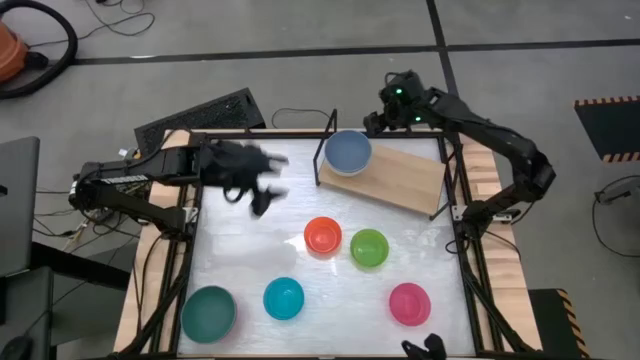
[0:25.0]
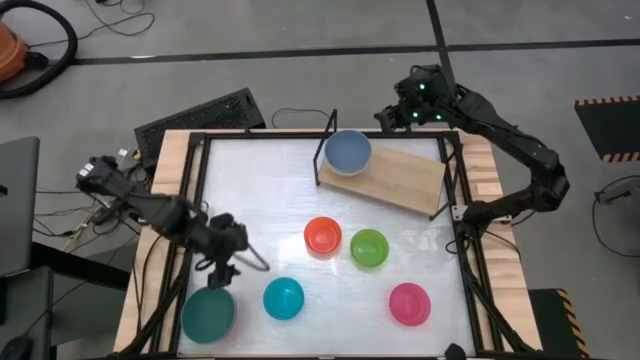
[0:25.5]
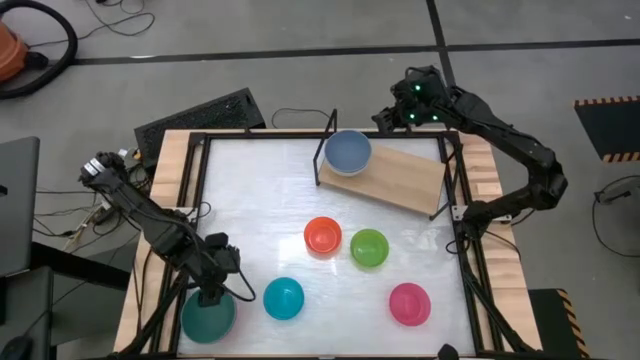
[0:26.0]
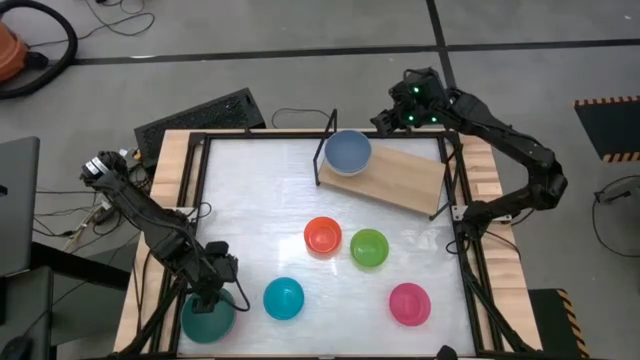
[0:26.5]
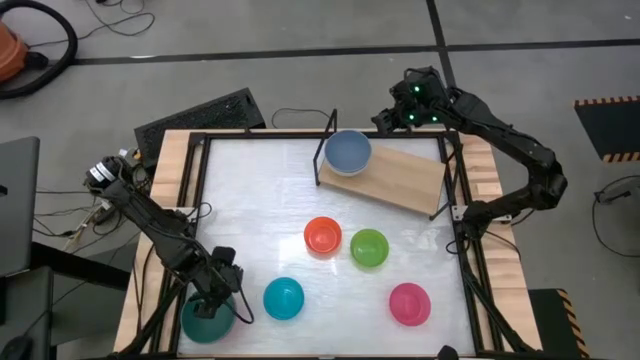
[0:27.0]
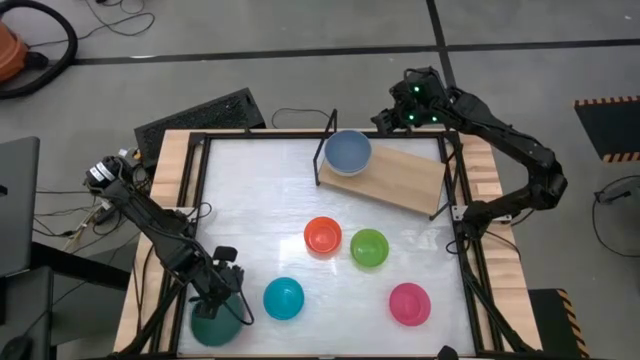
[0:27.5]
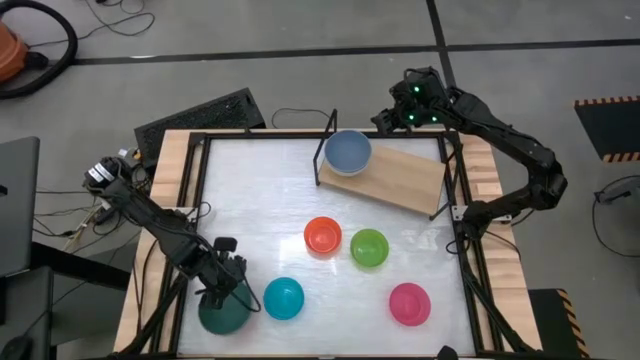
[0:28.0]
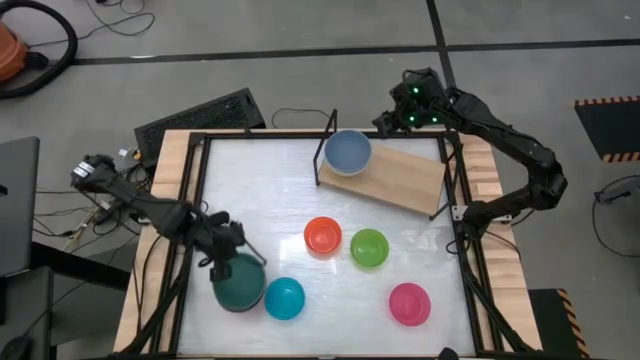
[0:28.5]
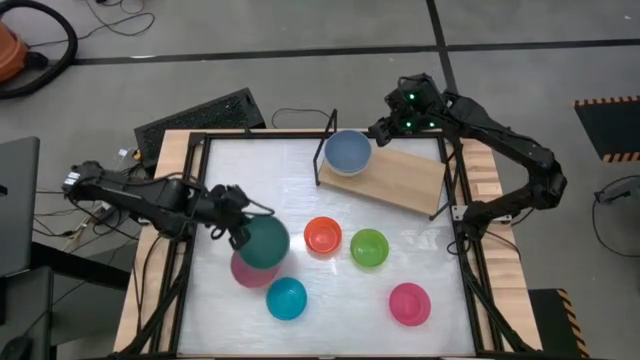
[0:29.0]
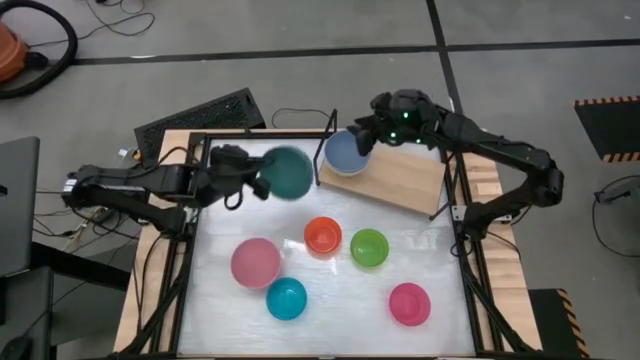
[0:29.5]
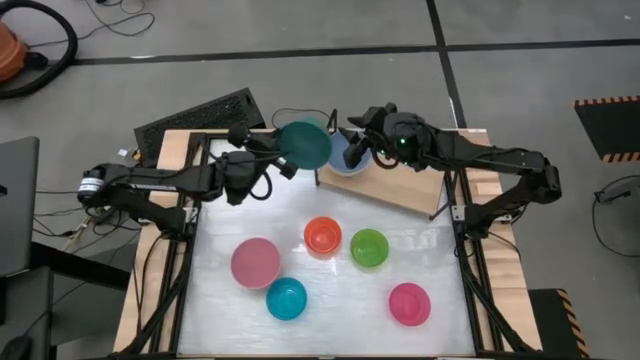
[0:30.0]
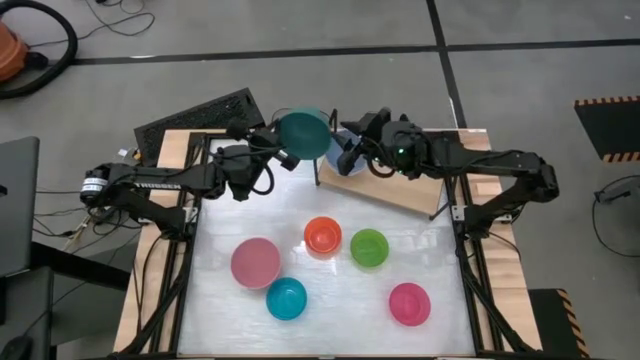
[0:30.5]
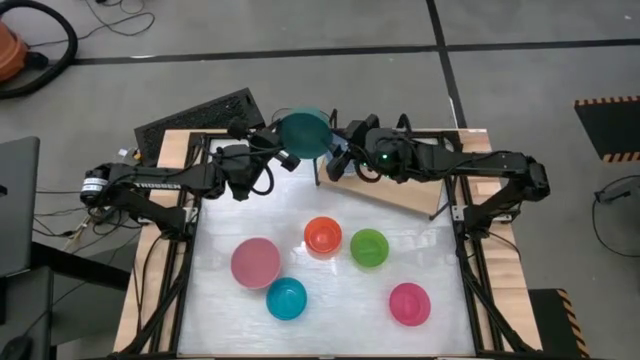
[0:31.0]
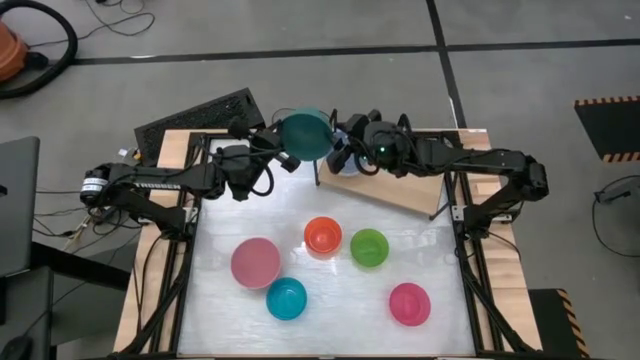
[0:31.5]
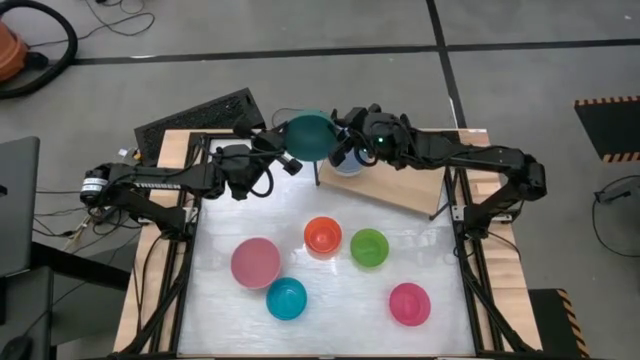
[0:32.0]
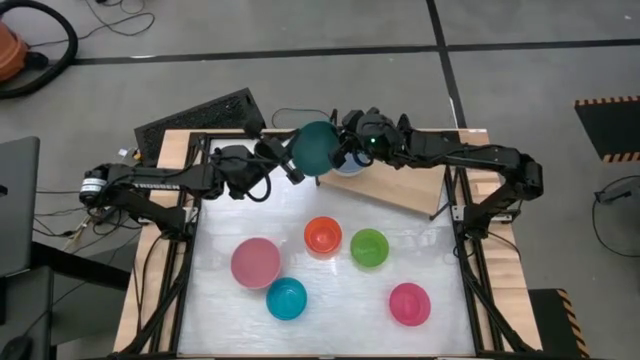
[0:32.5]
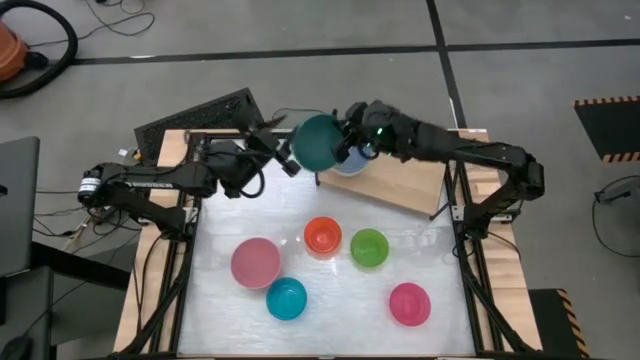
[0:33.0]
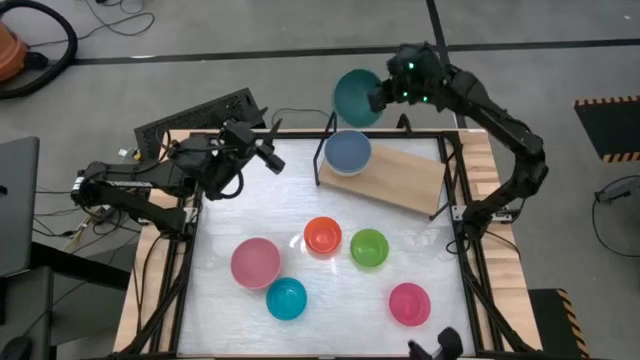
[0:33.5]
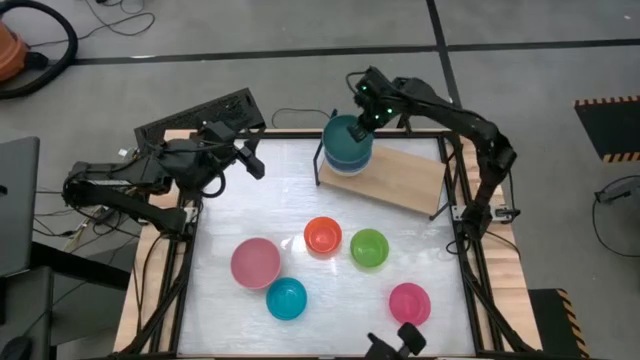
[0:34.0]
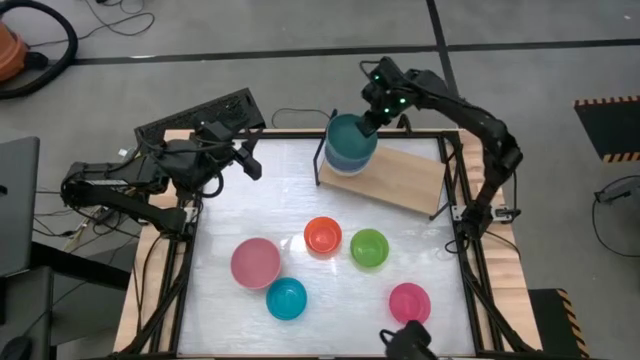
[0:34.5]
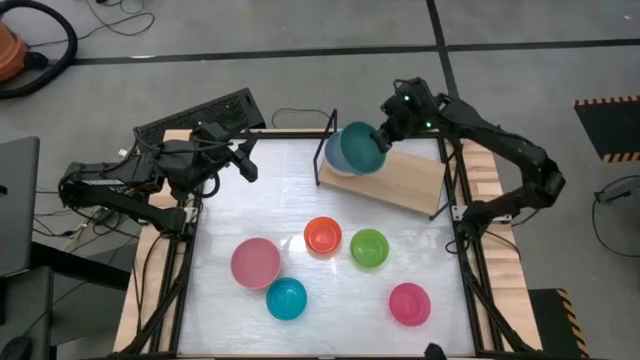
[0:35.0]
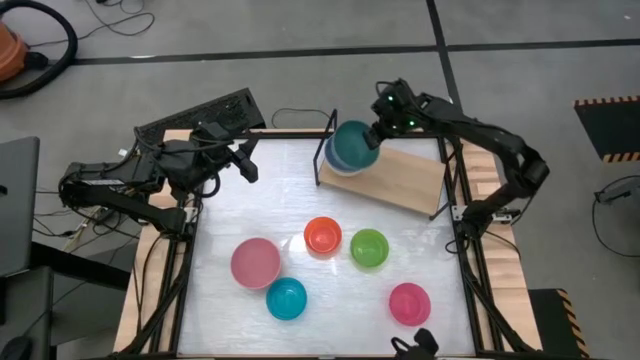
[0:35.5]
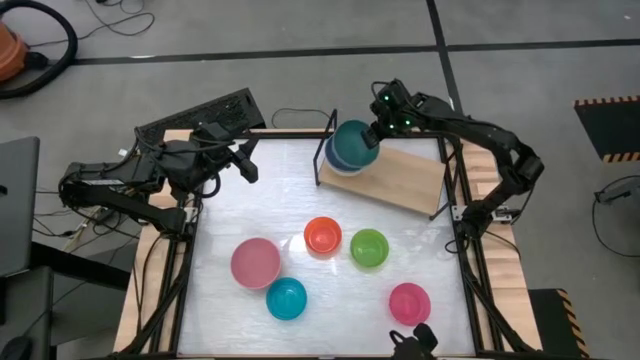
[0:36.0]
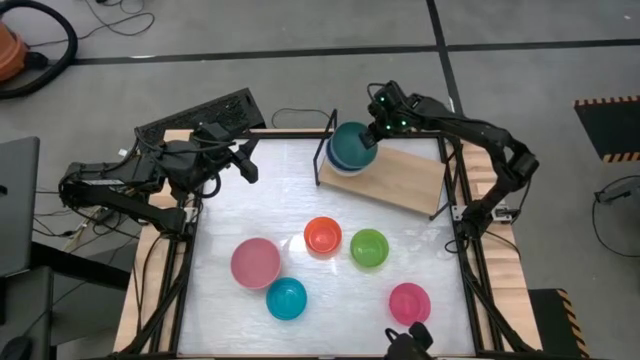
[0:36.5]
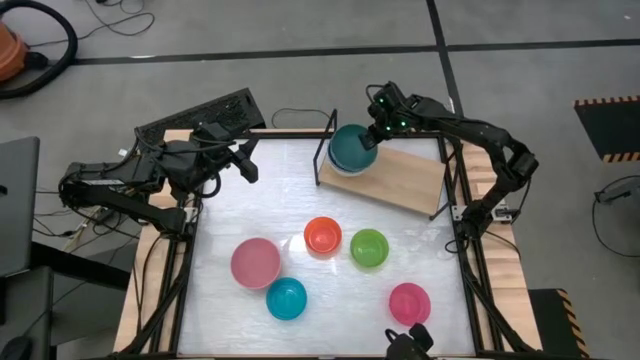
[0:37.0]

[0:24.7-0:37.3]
Task: Place and stack bowls onto a shelf
Stack the green bowl on top of the purple bowl on the shelf

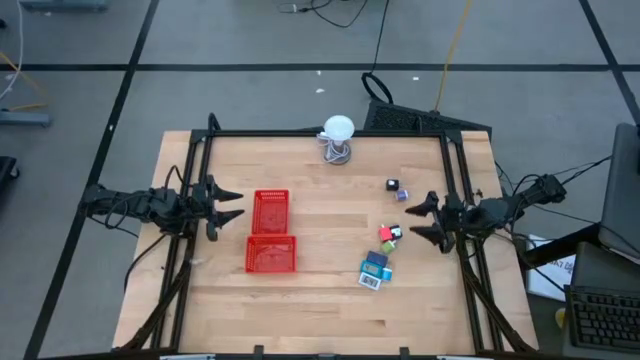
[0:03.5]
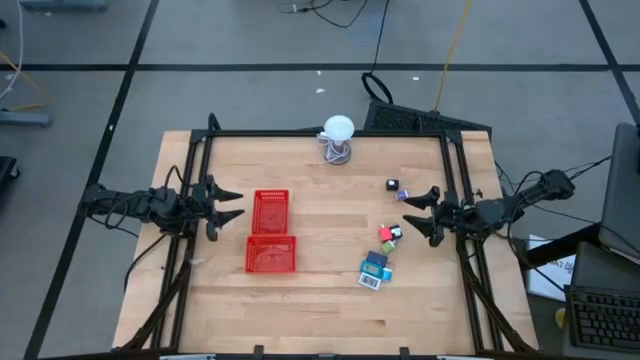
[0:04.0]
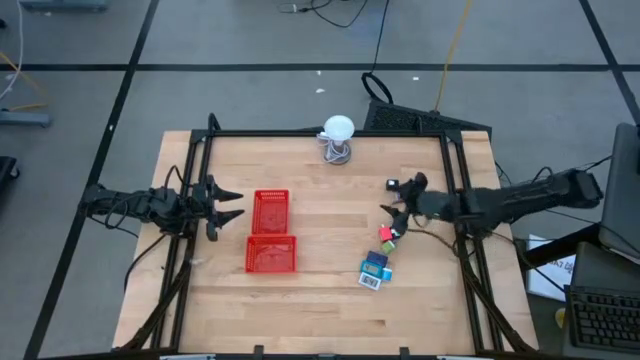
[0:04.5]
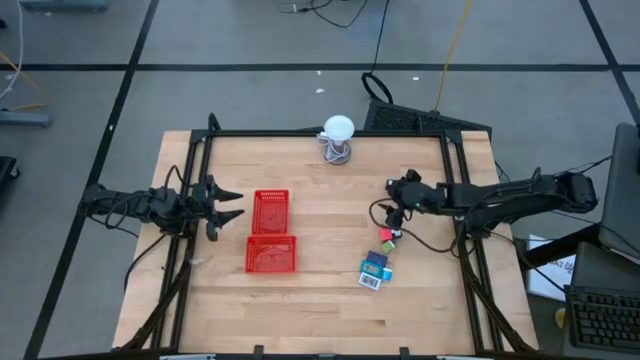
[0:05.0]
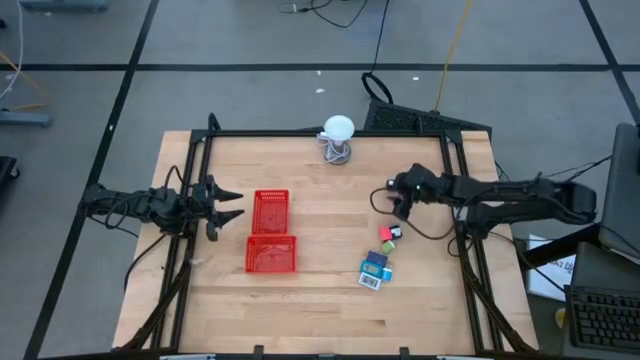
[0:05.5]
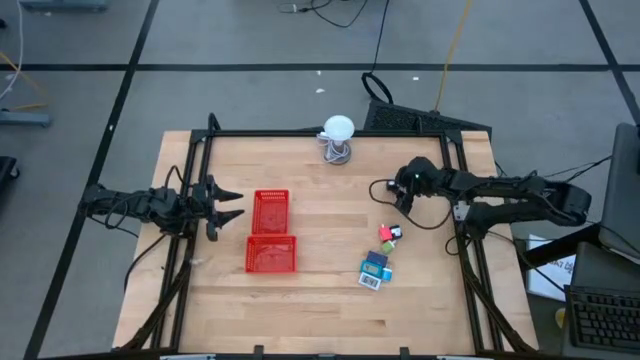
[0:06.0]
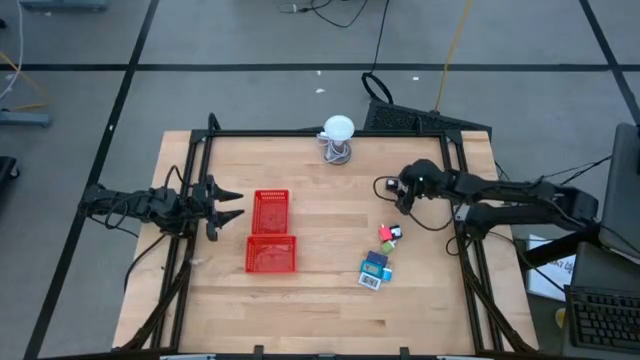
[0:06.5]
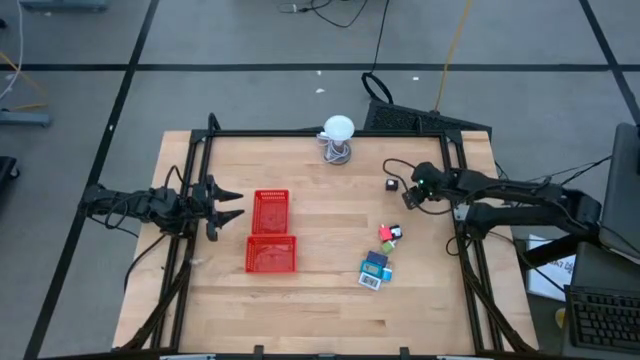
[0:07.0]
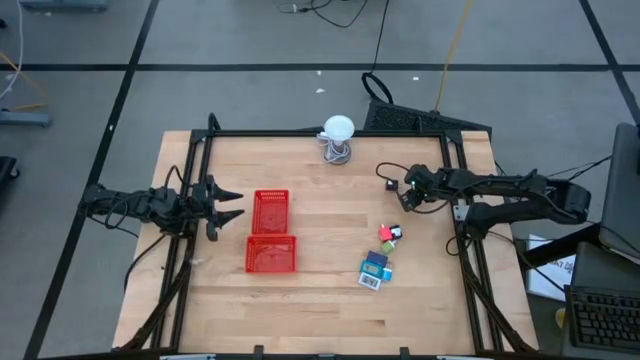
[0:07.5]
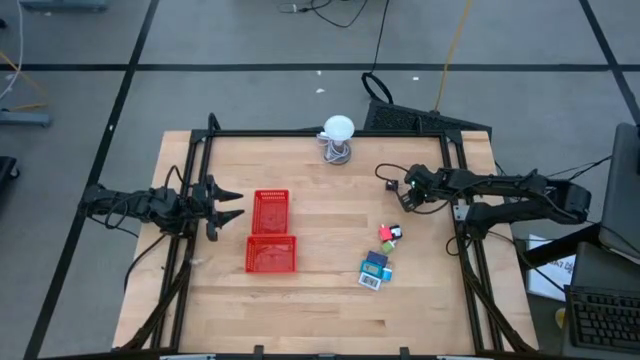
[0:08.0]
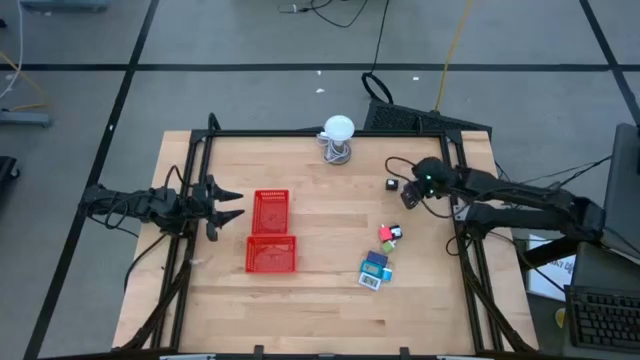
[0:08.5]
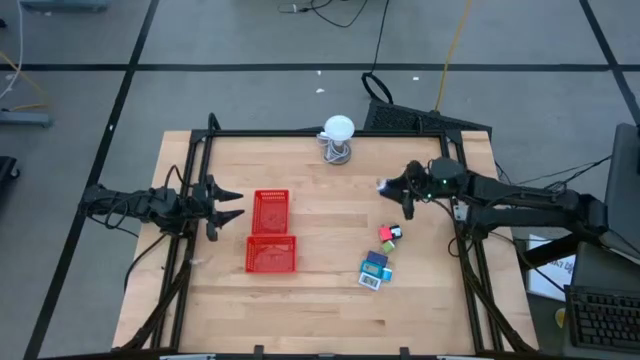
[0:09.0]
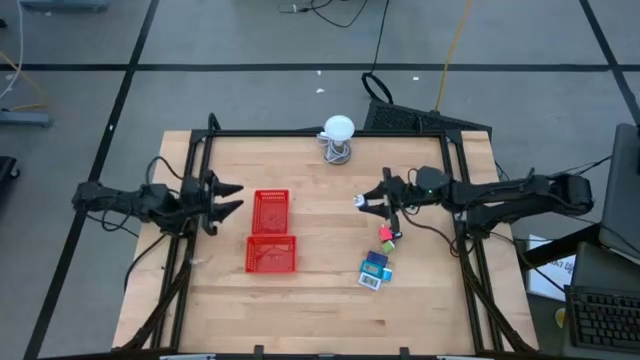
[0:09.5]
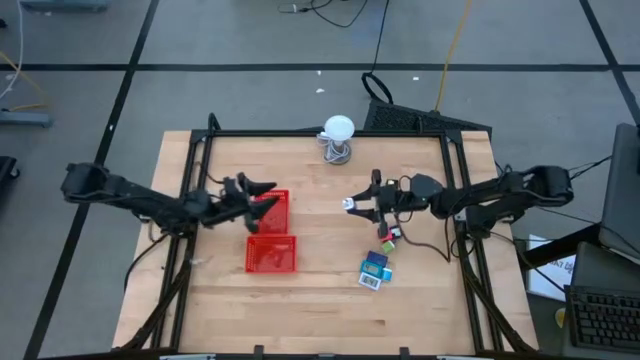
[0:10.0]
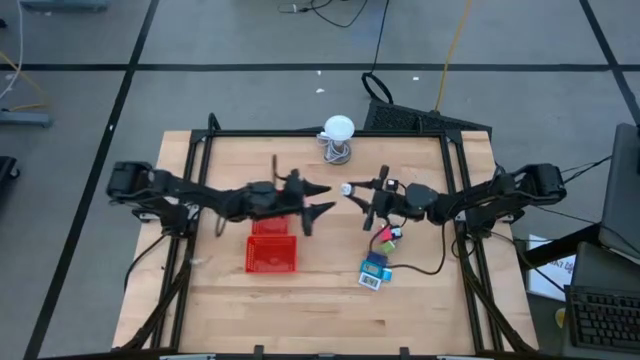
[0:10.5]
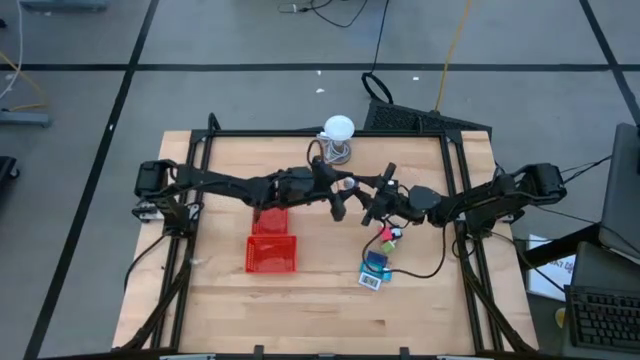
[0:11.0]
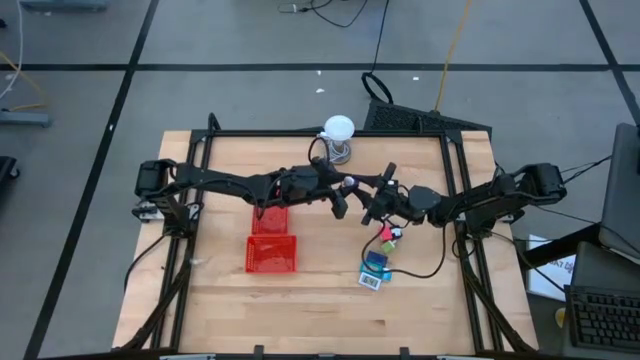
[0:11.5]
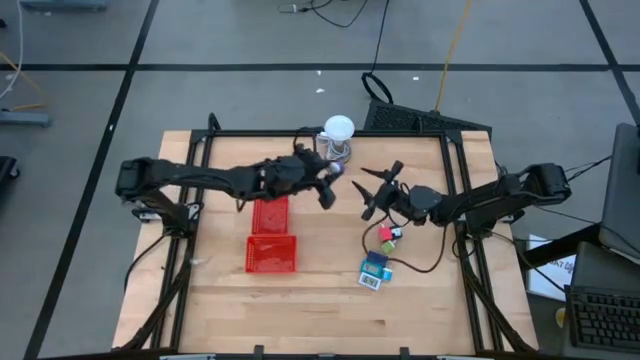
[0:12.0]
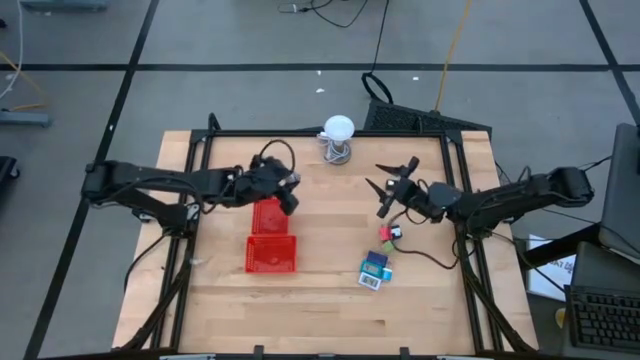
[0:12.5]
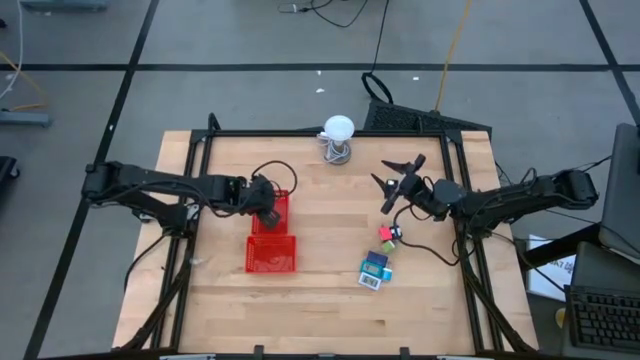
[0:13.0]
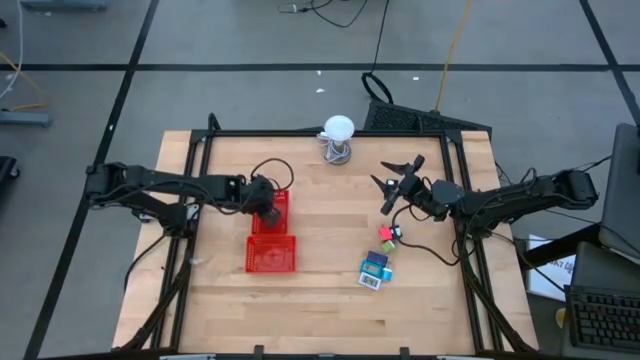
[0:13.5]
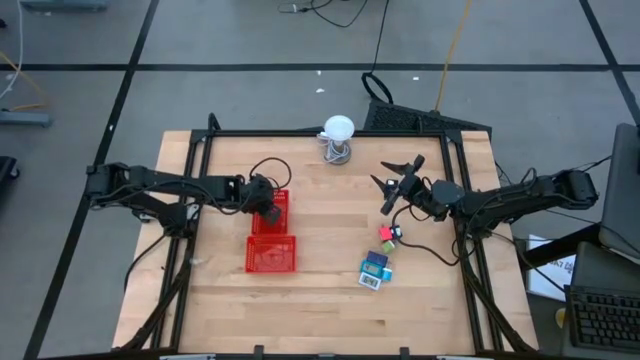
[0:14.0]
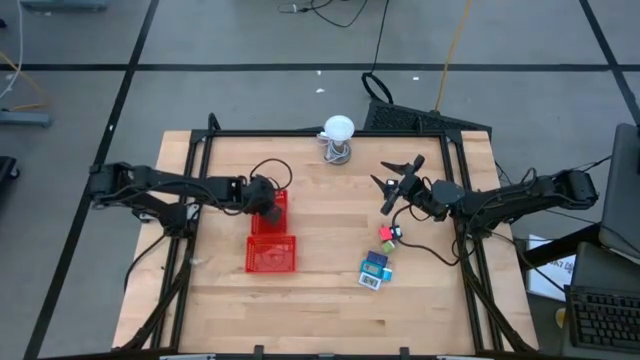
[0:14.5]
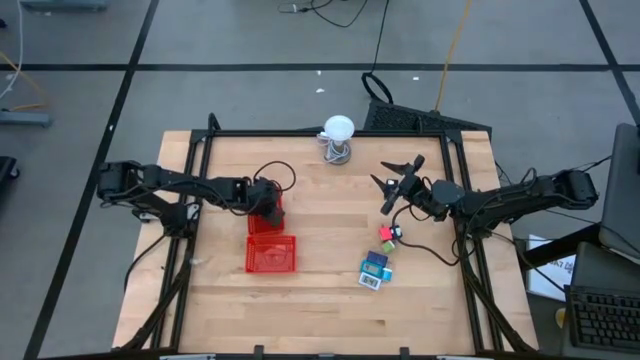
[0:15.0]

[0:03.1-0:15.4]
Task: Pick & Place Office items
Put the purple charger adapter into the top red basket
